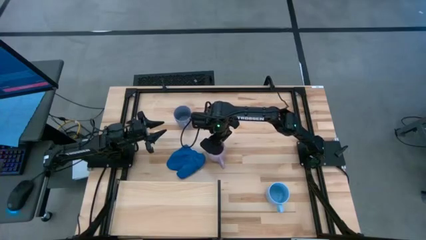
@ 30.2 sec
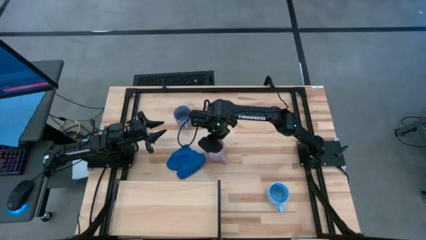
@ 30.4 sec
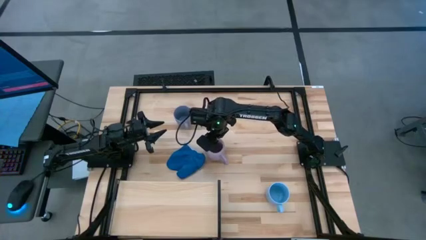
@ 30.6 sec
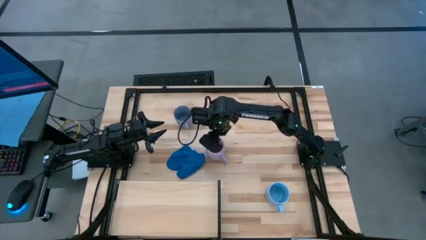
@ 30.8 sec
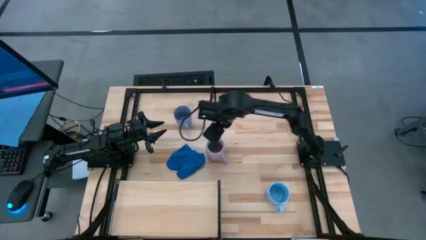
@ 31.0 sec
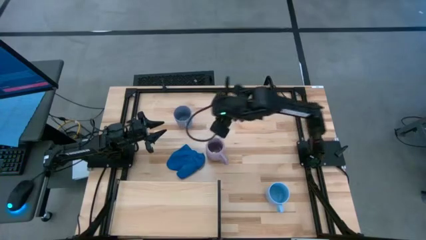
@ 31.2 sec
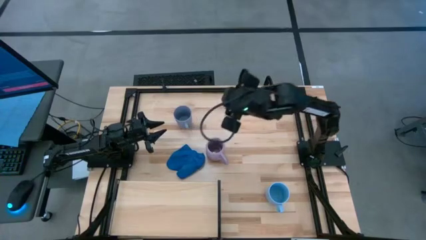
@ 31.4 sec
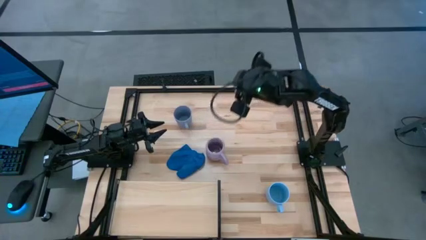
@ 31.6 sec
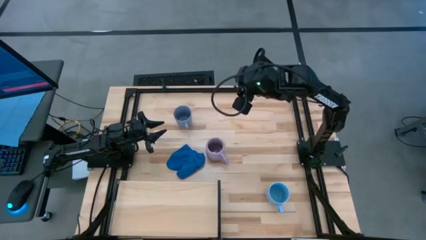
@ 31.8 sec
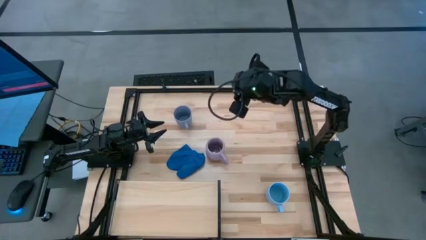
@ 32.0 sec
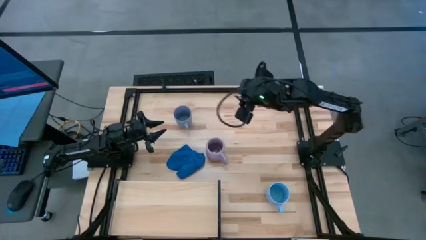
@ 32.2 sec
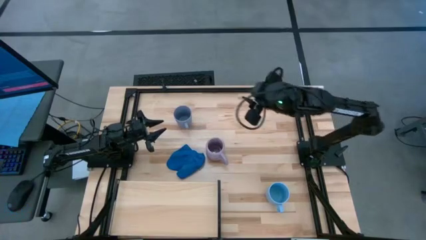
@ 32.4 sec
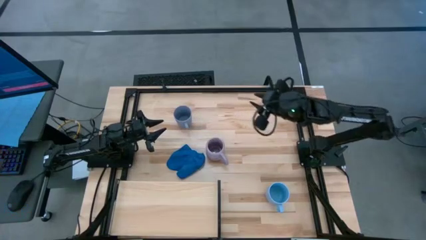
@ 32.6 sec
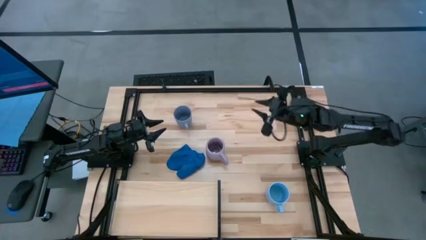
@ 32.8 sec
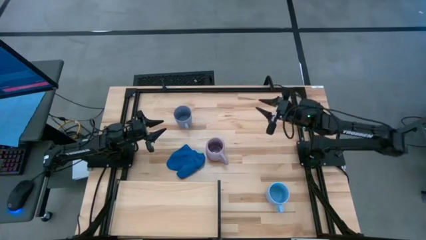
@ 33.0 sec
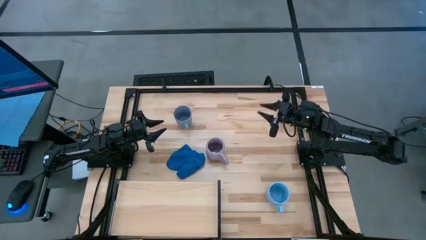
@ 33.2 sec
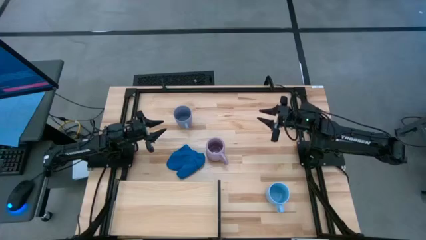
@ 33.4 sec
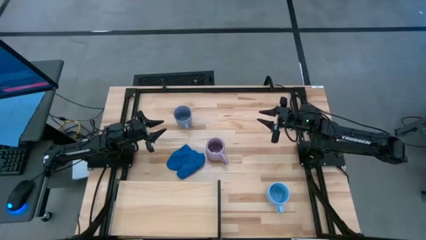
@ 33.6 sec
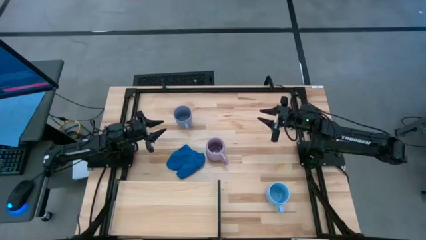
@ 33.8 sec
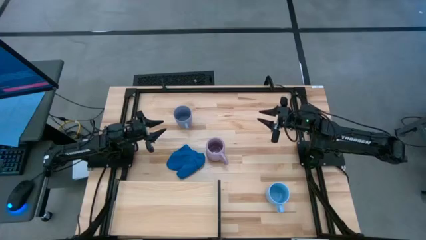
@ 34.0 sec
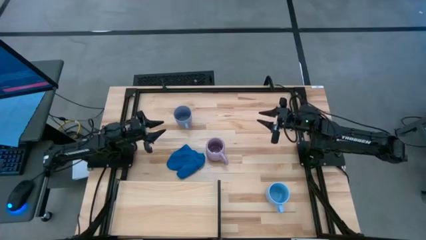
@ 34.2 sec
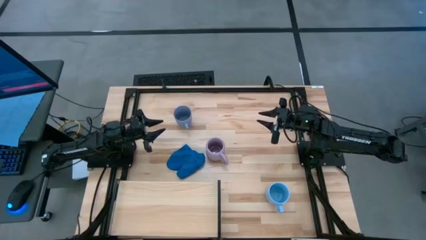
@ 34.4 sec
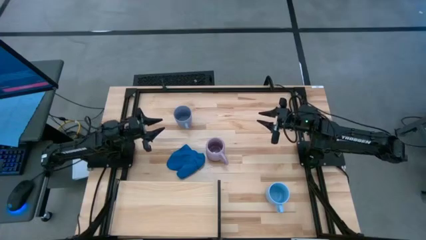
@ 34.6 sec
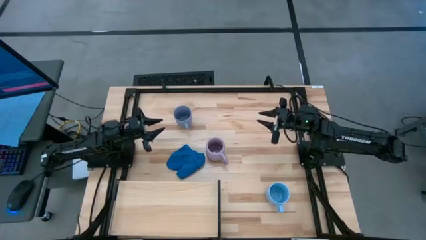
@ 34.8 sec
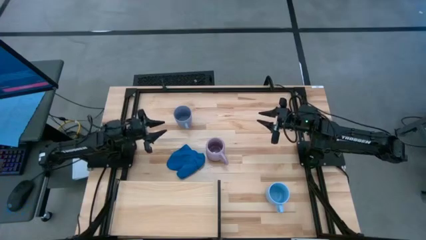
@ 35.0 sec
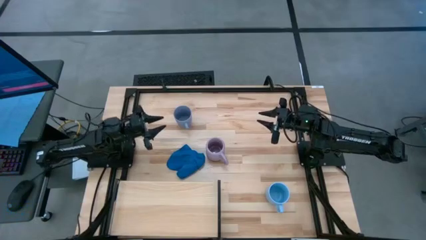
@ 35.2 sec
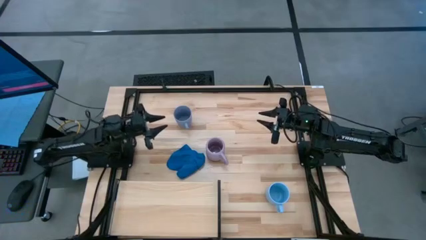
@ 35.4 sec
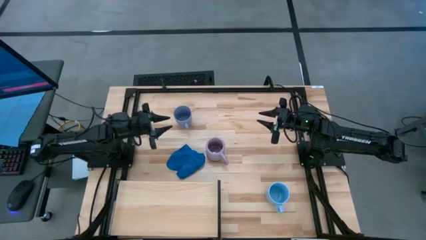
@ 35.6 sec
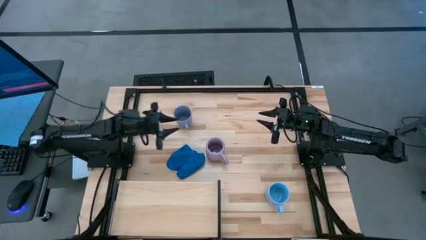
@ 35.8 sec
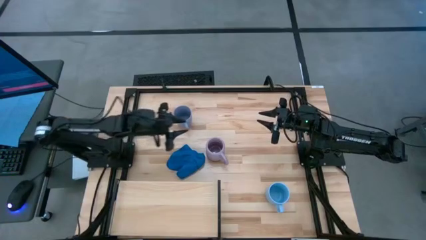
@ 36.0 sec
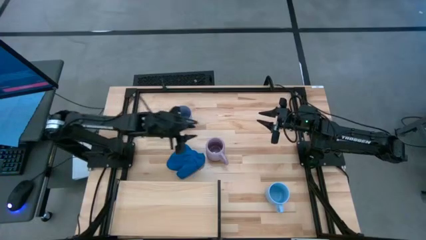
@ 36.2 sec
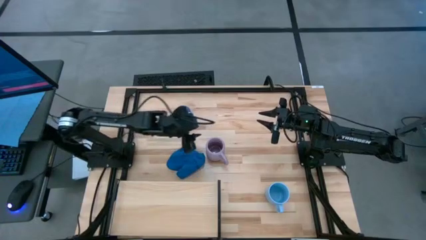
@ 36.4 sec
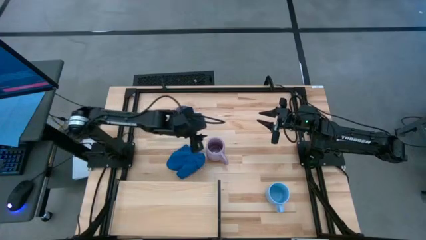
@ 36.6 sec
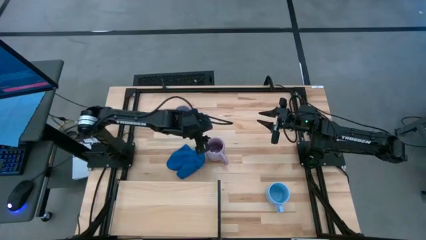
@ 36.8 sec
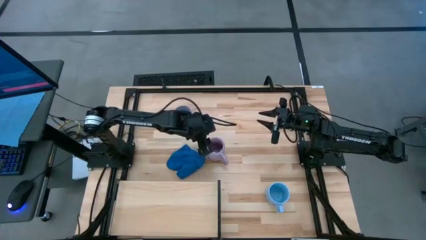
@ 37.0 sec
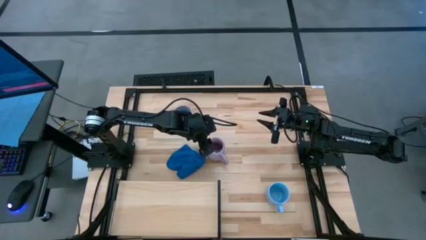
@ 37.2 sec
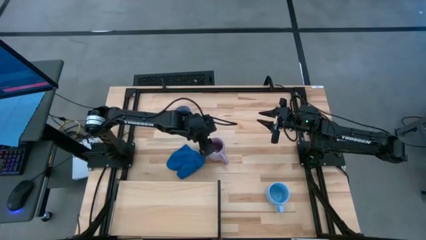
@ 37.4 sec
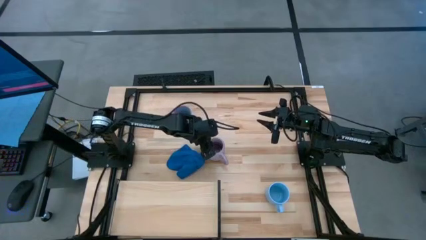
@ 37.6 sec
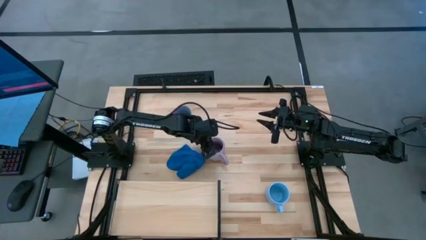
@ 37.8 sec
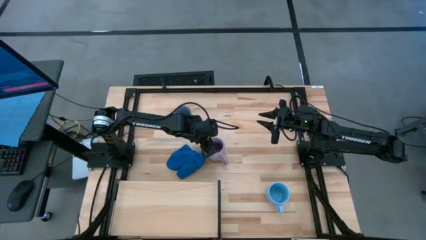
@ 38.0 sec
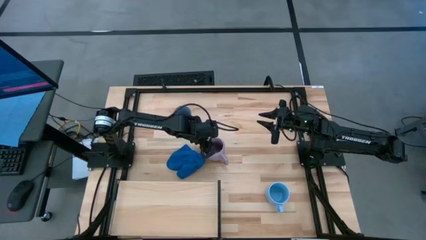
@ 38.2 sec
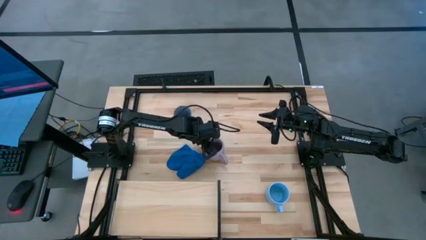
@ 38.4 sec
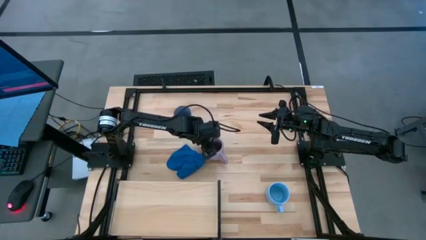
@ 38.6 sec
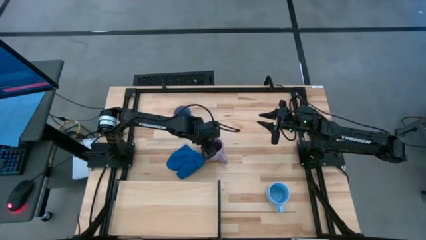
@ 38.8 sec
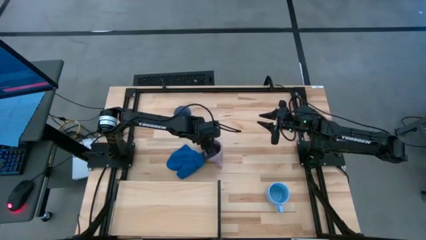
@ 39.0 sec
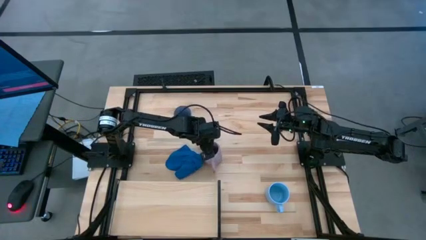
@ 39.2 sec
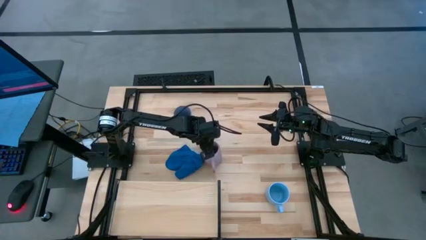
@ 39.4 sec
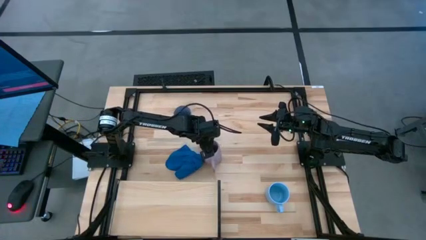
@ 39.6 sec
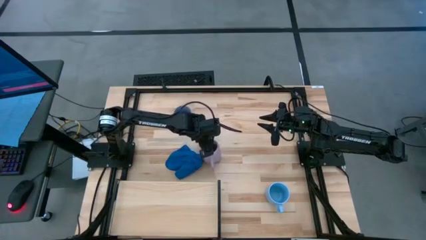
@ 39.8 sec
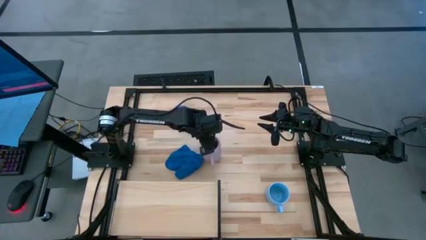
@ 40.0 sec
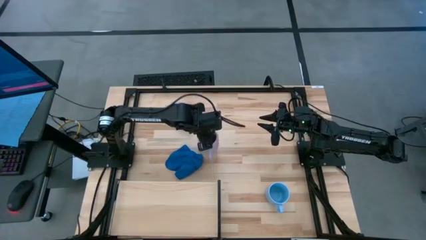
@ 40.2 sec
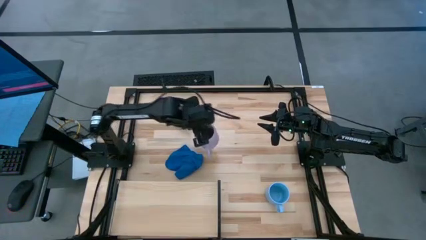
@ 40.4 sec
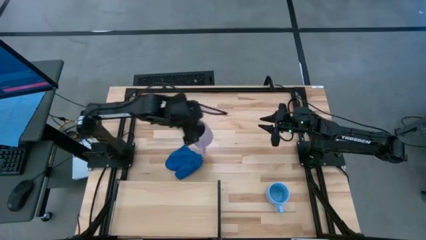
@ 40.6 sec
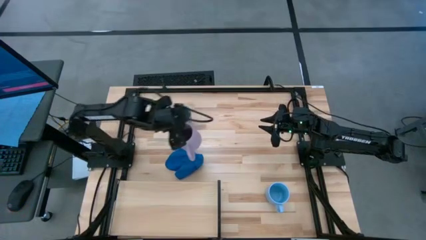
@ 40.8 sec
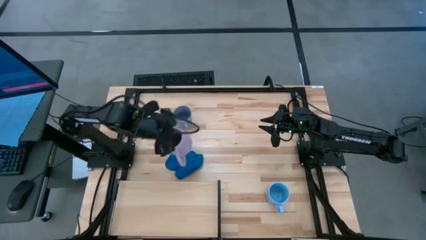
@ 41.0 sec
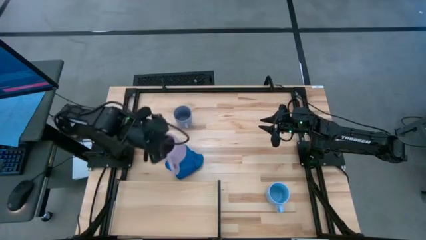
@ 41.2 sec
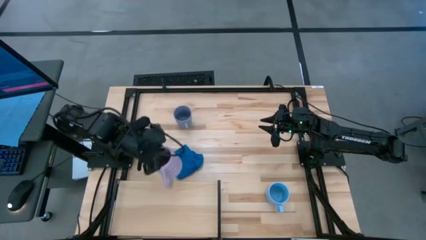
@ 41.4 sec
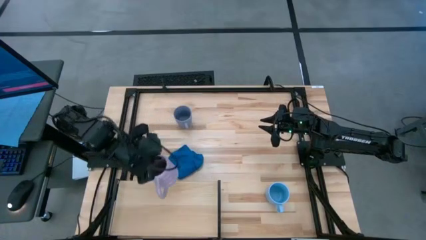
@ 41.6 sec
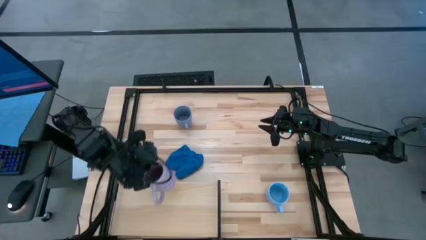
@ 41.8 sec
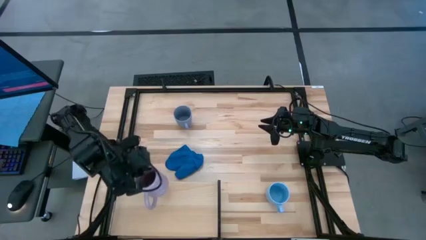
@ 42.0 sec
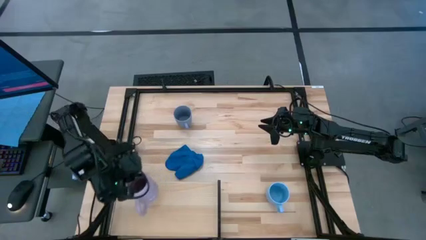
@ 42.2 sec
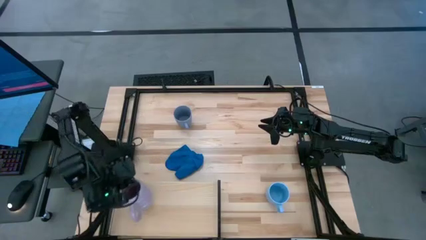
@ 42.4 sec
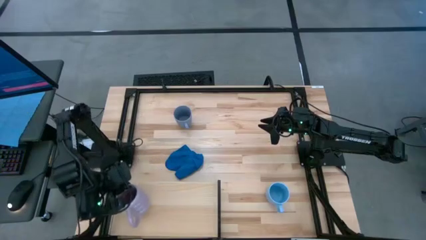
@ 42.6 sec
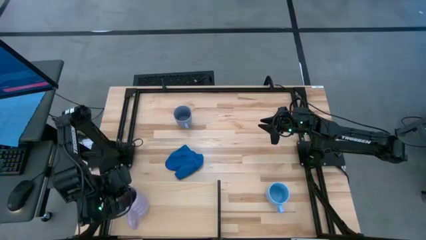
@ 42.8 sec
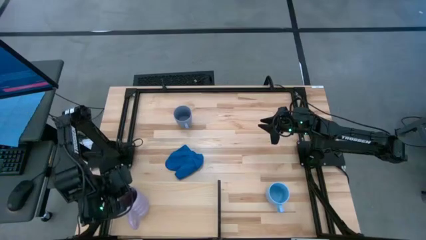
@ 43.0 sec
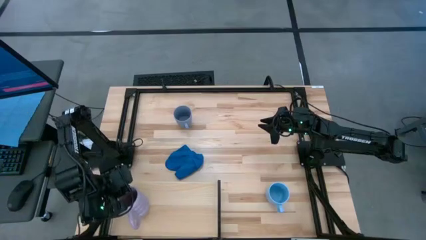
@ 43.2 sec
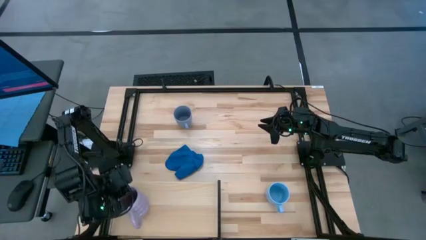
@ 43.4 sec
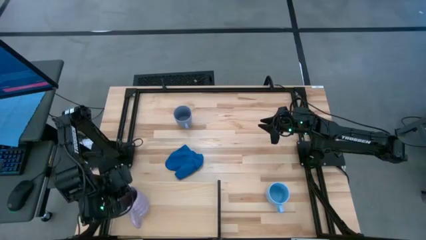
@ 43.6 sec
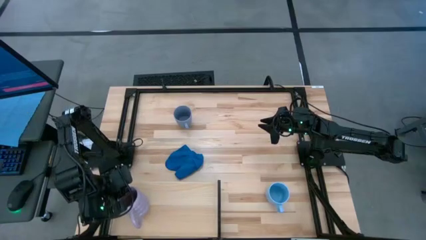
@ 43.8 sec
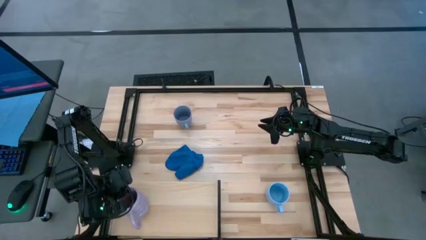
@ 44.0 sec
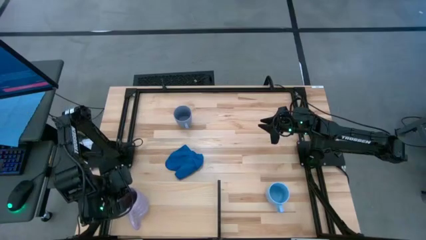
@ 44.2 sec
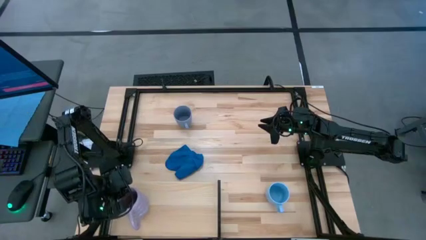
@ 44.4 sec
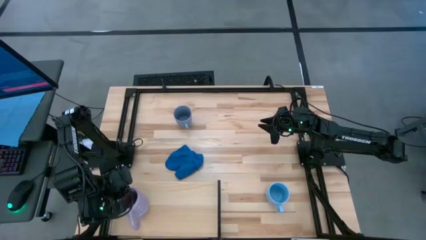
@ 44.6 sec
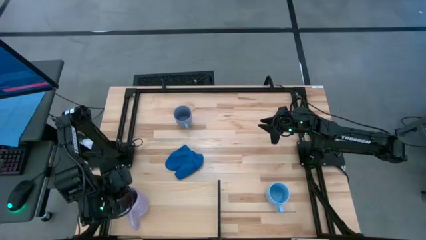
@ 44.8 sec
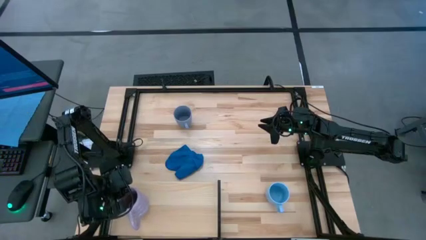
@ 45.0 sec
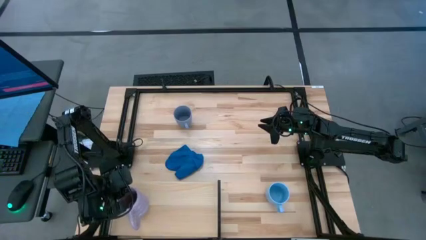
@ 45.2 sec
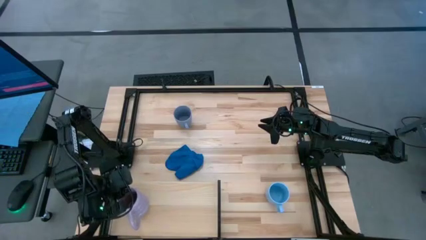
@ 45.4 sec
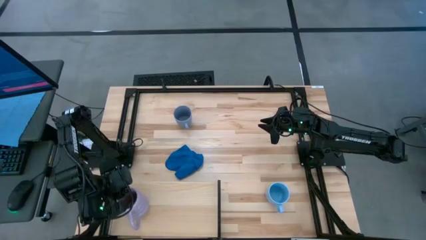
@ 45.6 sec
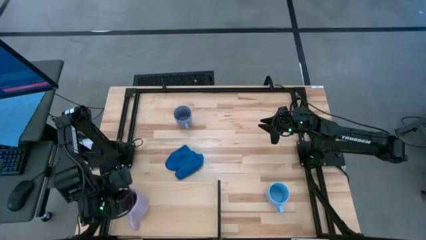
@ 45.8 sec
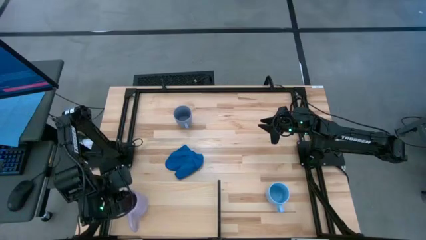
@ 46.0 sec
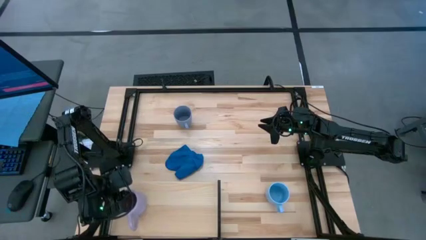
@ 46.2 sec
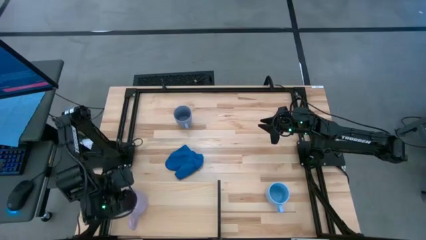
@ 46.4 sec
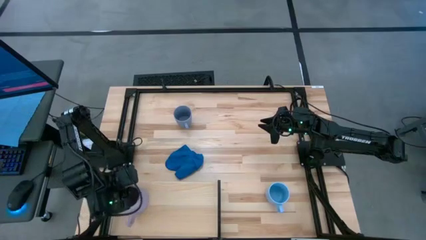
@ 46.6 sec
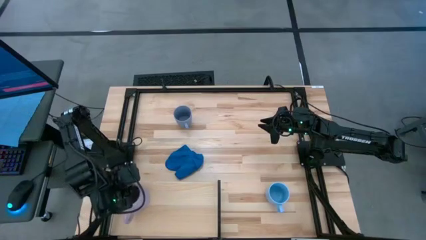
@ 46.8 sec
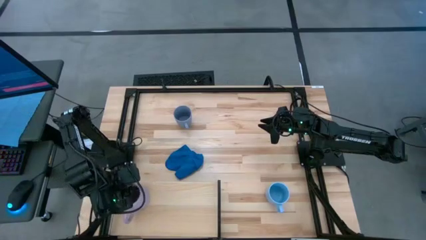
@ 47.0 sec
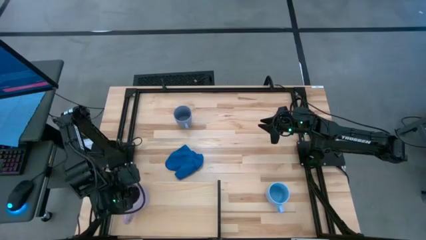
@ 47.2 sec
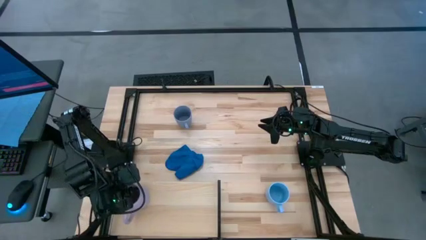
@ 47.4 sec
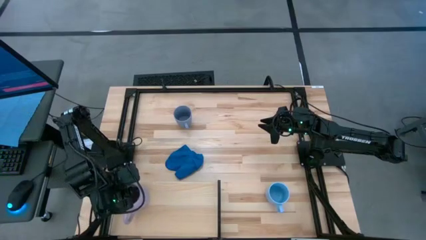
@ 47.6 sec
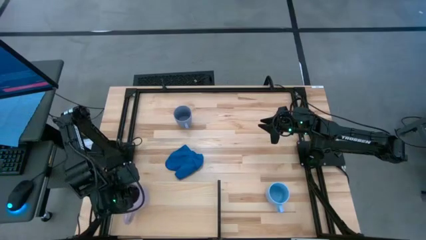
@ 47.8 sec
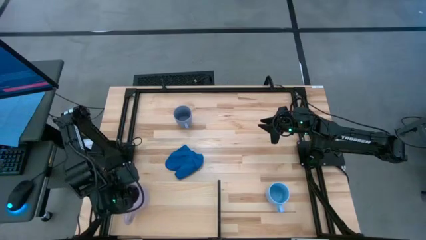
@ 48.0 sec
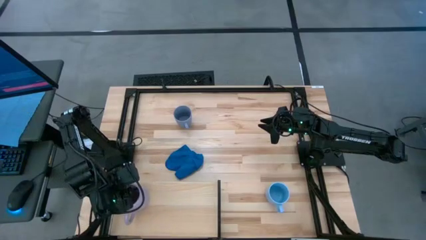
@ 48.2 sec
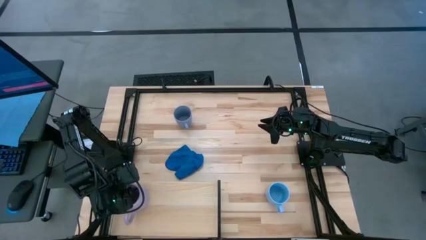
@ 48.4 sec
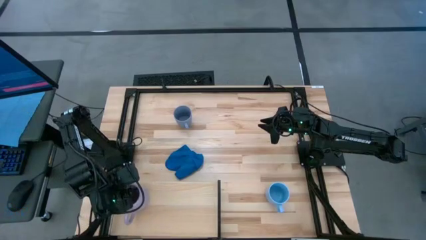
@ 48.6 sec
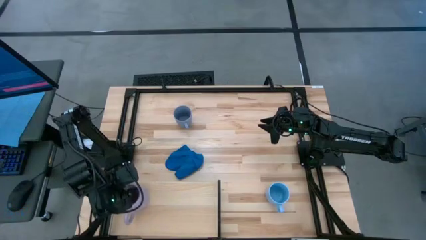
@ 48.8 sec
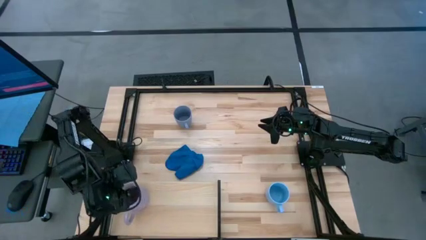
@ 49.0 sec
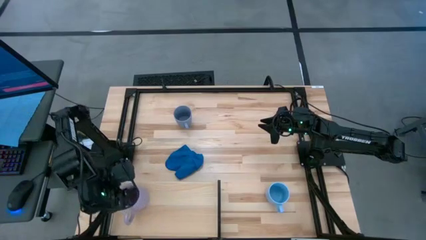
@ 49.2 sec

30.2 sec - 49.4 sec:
Task: Stack small to large cups/mugs on shelf
Put the violet cup on the shelf
